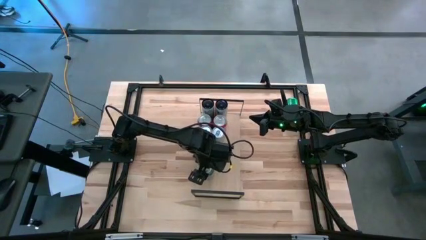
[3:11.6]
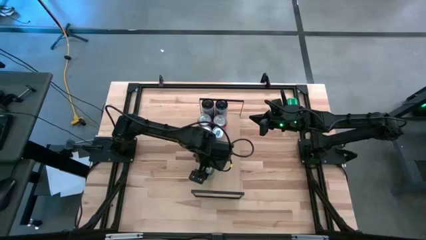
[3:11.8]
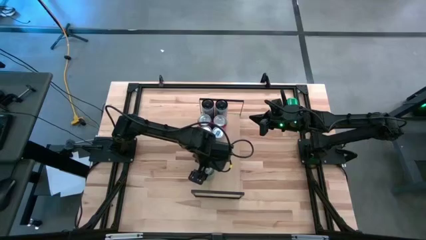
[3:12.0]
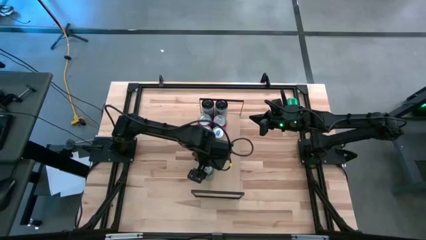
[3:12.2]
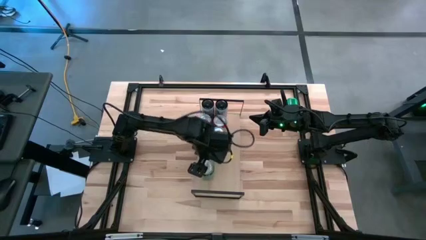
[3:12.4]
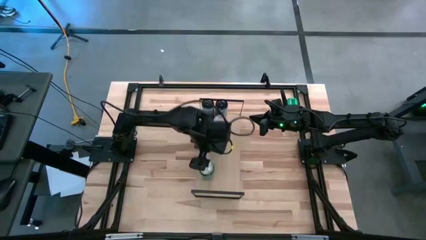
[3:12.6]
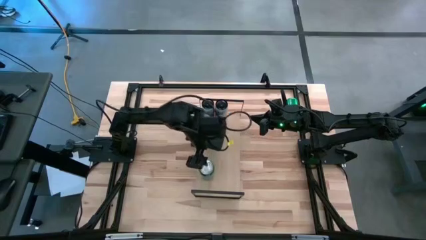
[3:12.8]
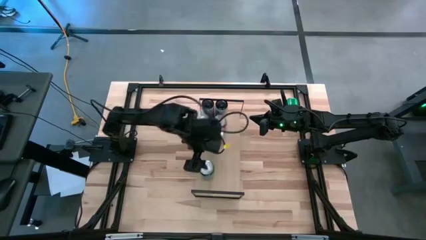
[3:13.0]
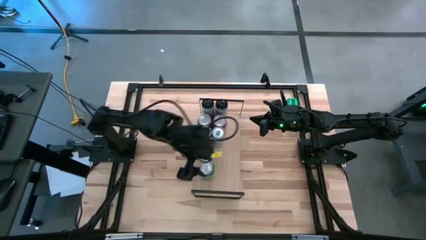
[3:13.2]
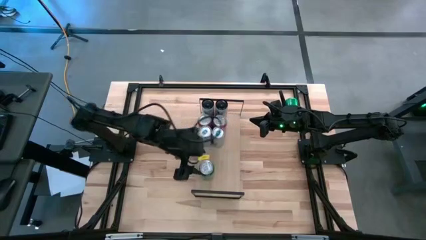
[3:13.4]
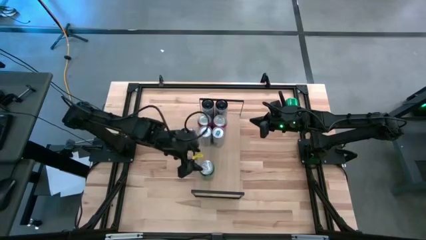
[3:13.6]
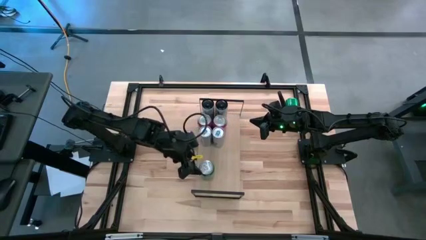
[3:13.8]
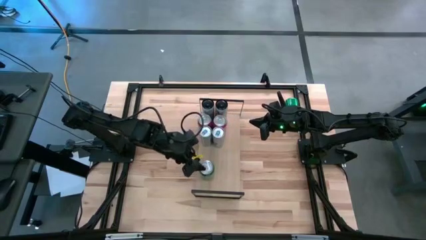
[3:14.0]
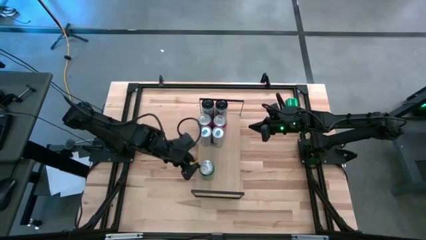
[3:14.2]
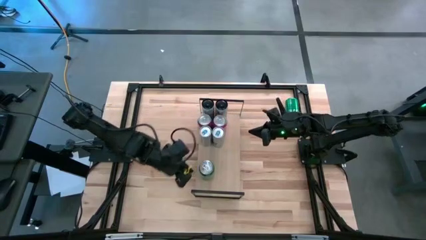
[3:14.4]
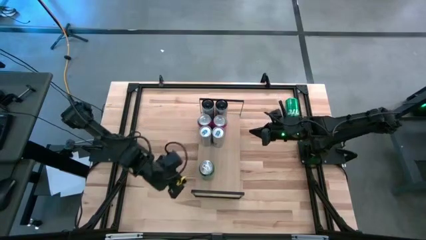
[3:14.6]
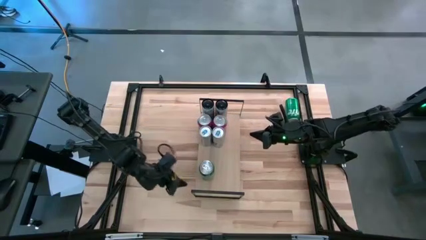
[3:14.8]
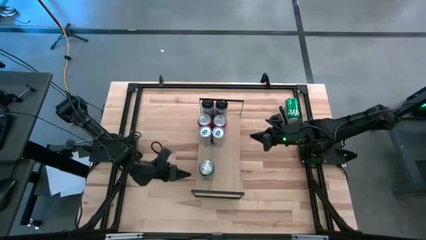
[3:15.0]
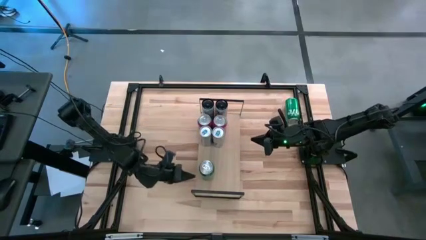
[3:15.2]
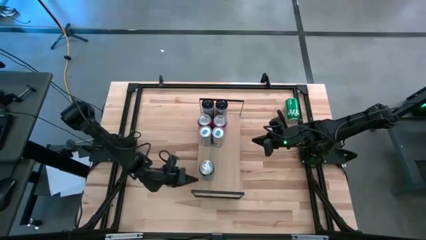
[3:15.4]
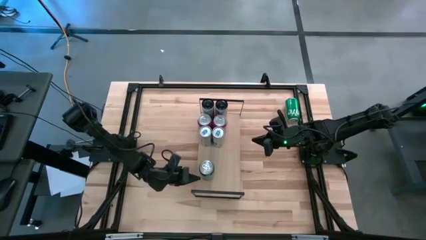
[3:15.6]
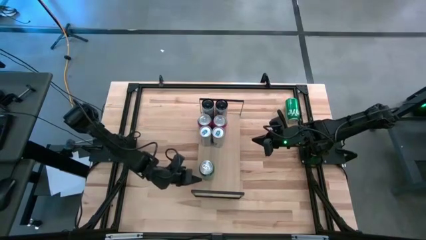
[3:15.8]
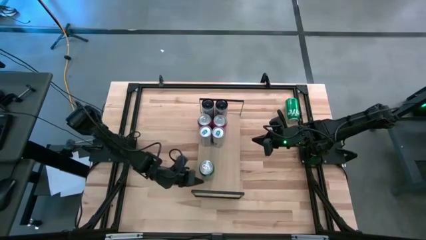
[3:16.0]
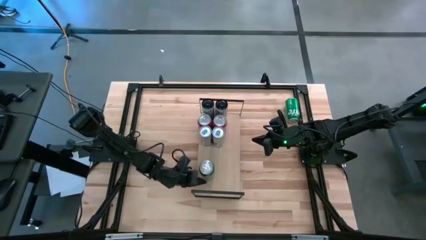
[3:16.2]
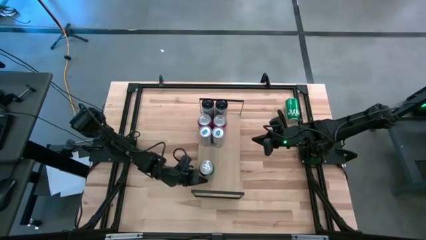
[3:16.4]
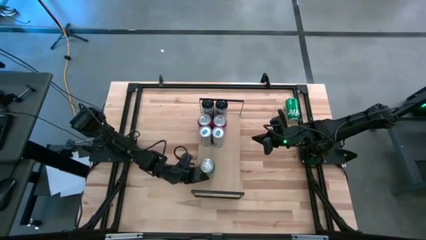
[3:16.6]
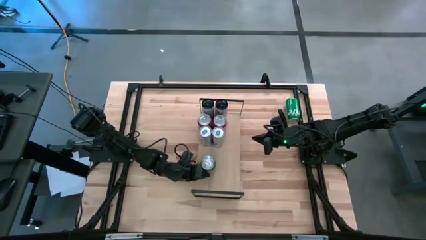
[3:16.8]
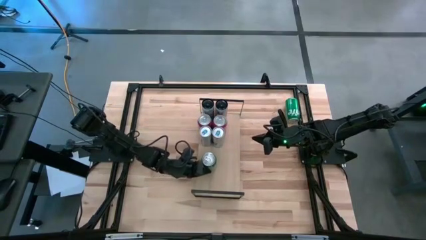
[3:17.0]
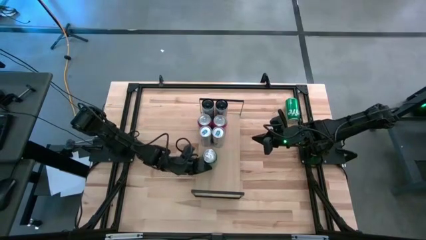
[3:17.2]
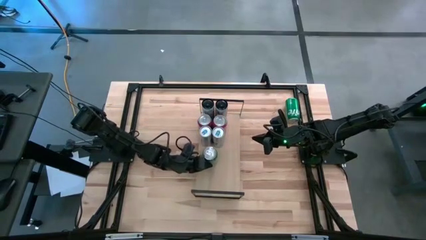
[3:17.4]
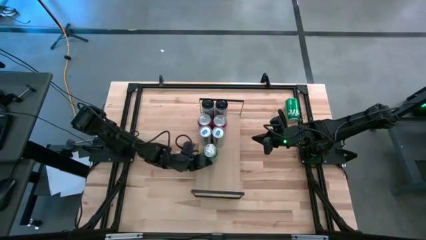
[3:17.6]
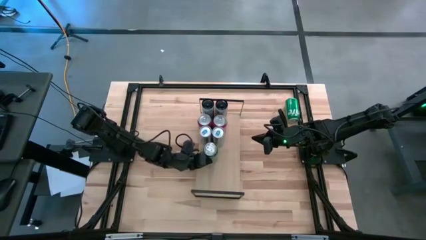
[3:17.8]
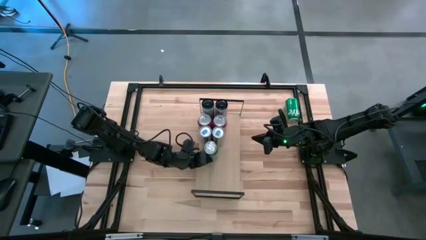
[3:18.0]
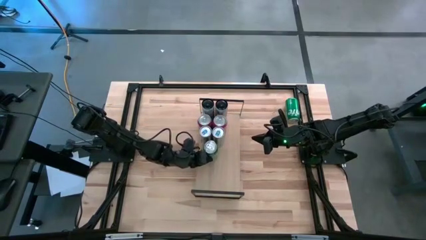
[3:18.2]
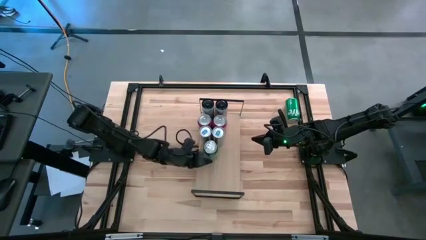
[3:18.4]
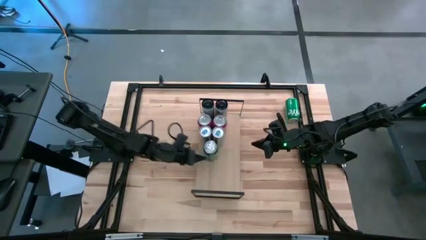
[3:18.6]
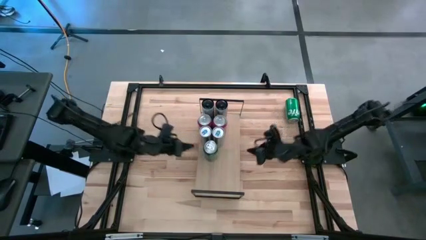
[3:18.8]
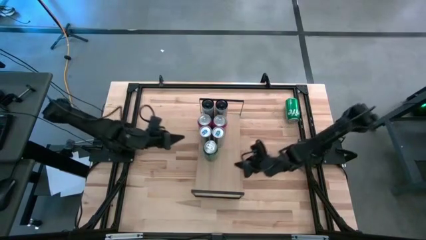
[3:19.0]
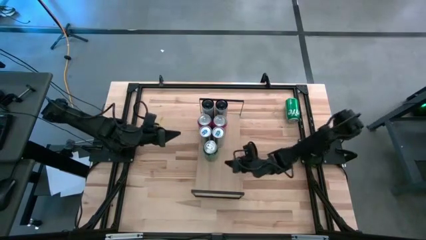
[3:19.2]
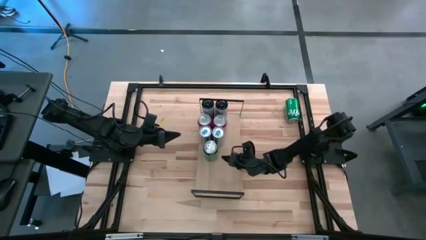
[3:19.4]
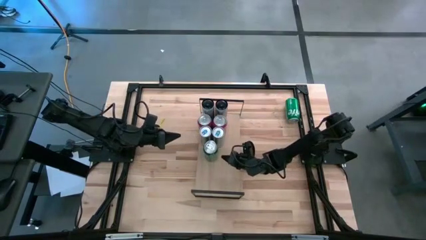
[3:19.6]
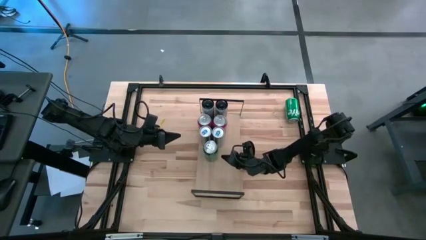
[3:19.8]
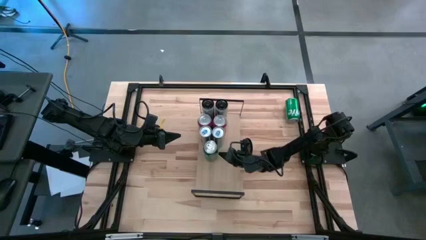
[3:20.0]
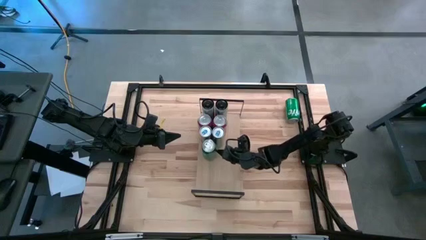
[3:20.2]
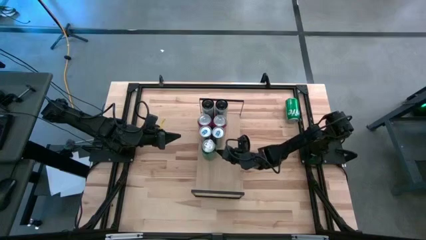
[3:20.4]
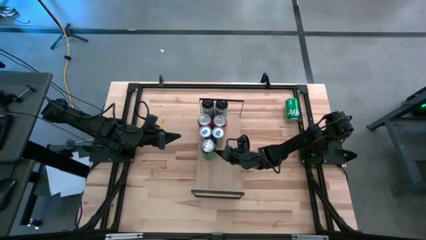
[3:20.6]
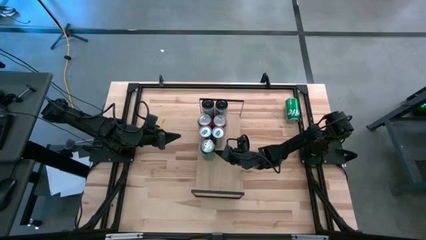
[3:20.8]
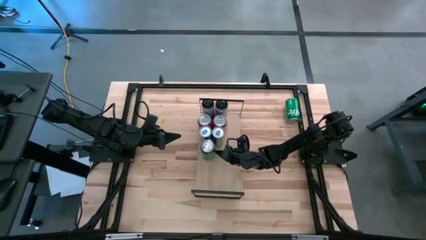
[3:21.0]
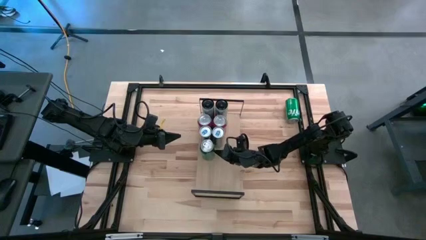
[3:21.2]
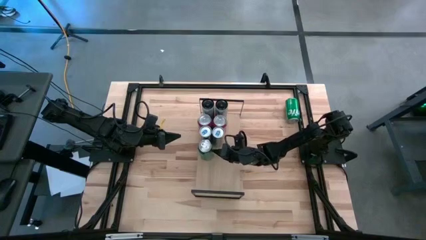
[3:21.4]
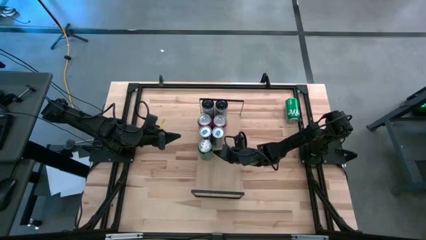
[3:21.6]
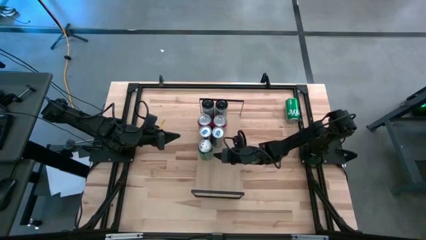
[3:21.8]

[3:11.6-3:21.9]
Task: Place canned beverage on shelf
Put the left green soda can on the shelf
